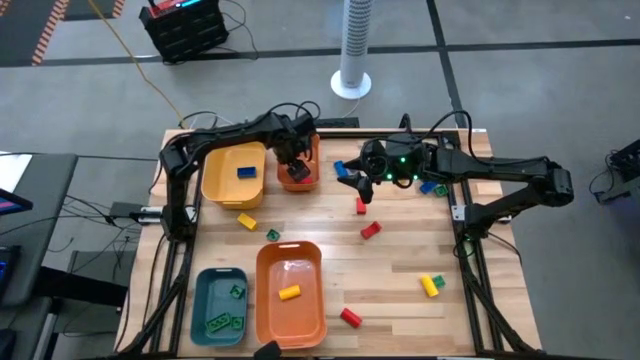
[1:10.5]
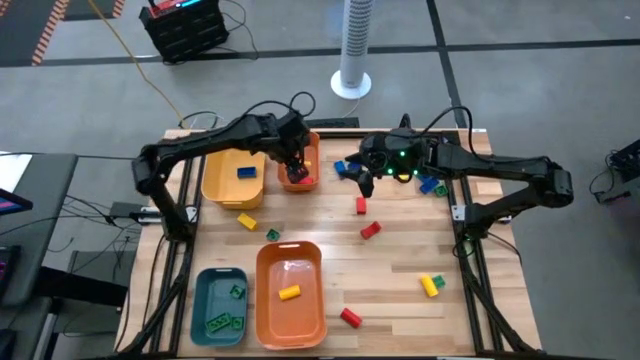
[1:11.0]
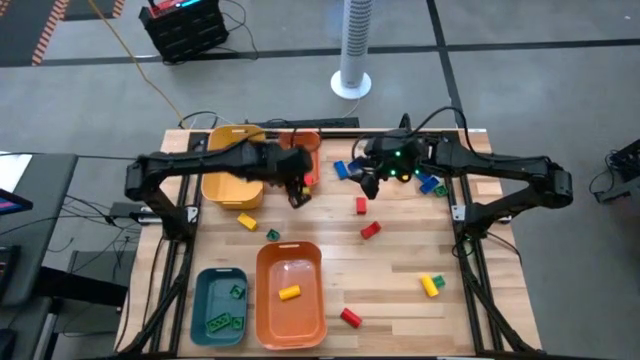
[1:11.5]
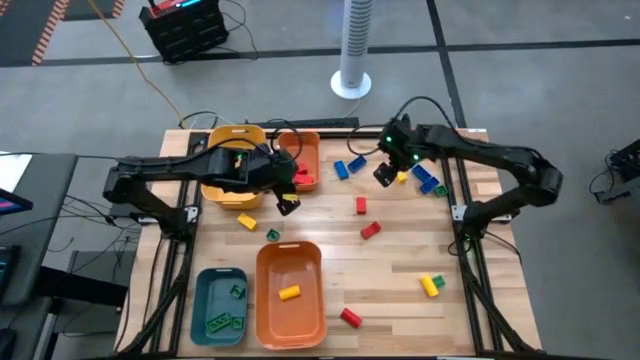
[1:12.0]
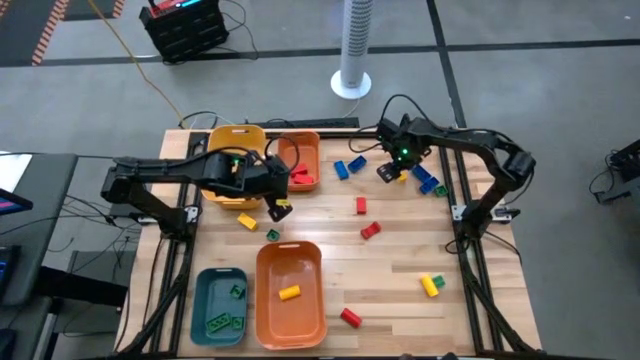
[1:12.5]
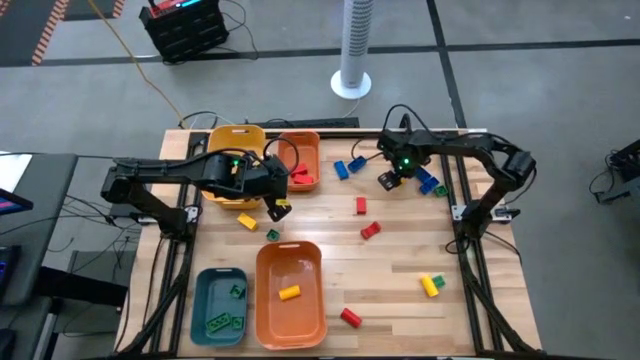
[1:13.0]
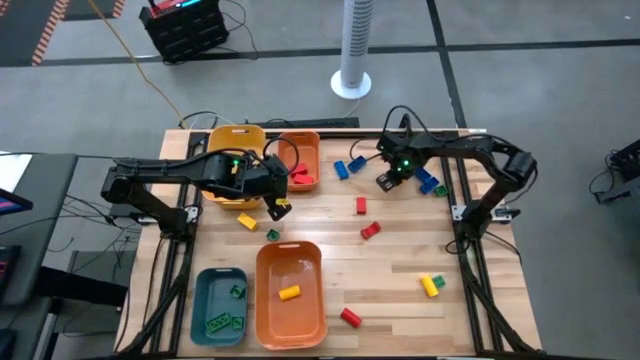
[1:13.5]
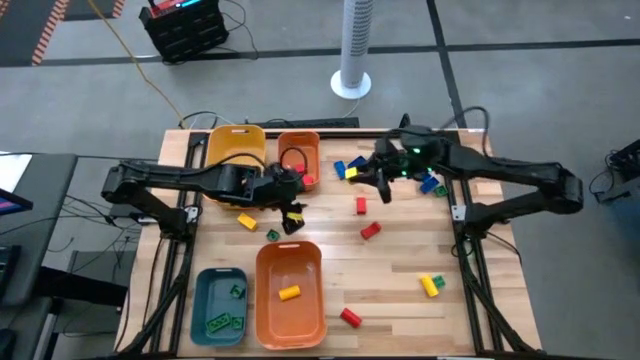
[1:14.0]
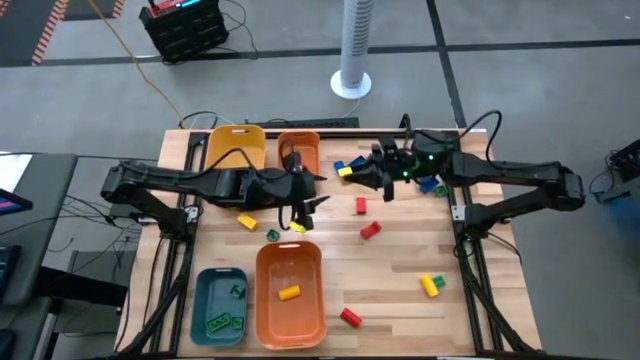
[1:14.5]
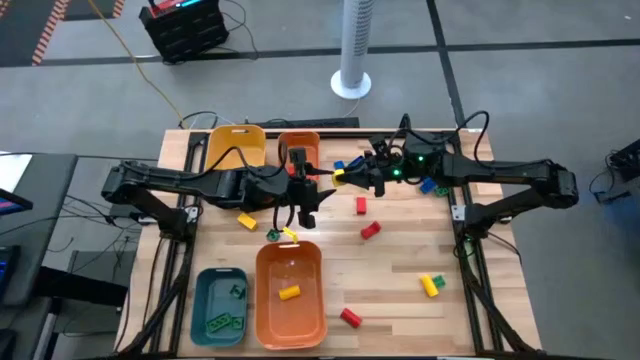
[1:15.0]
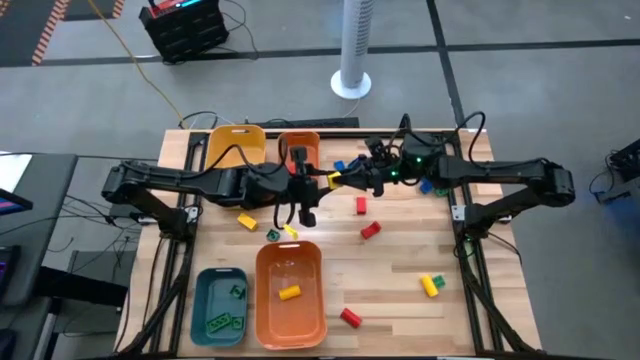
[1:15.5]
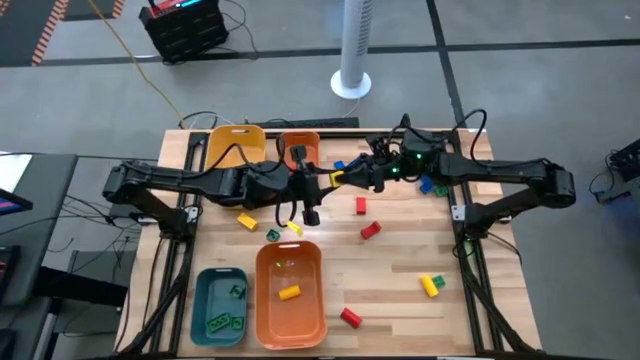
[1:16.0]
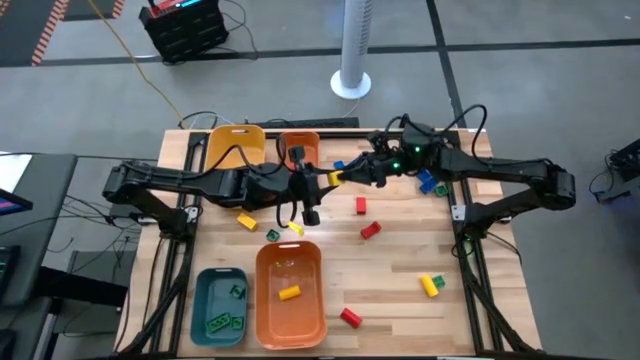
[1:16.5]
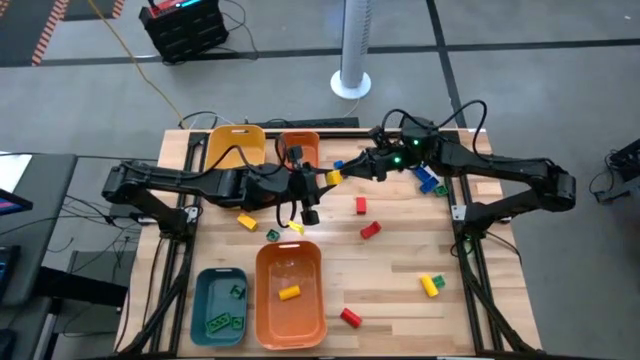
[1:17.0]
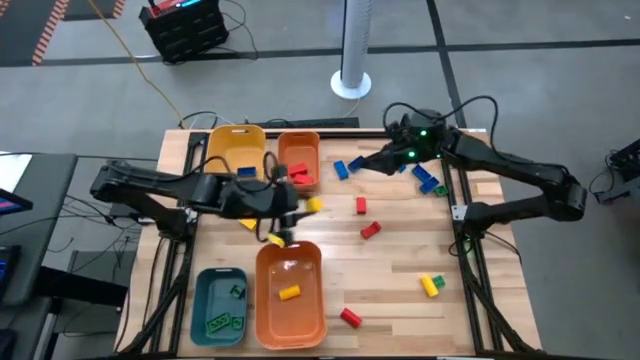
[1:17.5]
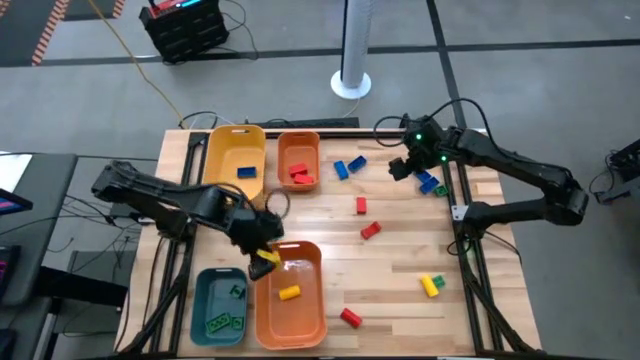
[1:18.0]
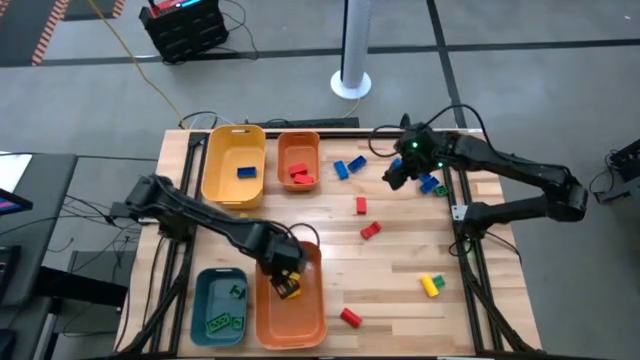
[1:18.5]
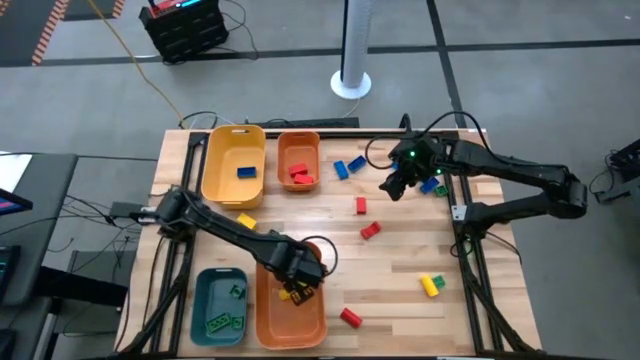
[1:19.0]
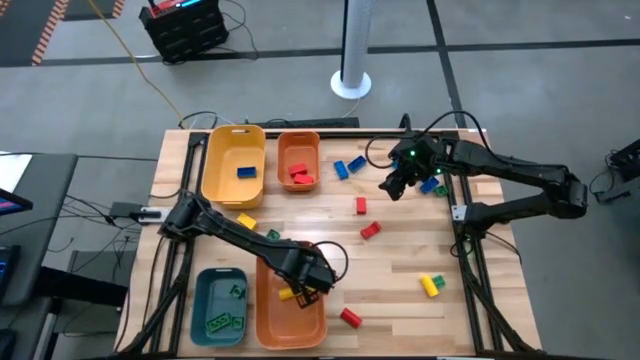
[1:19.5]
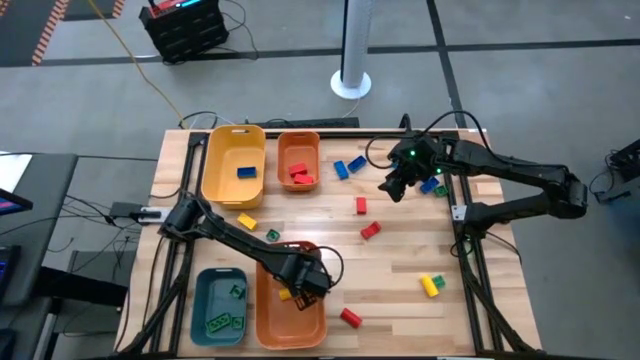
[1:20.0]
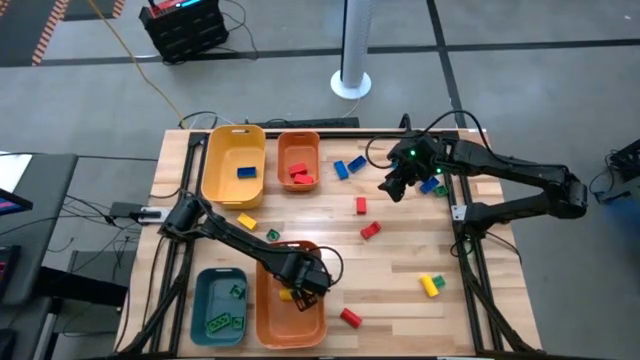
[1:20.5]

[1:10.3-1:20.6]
Task: Sort blocks
Put the yellow block into the bottom orange bin

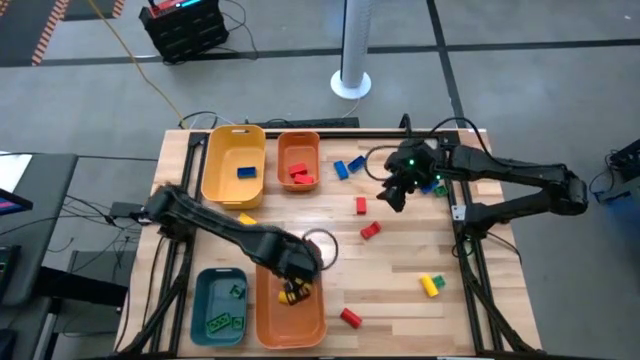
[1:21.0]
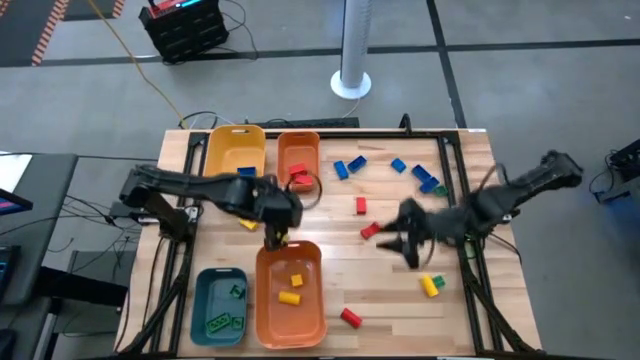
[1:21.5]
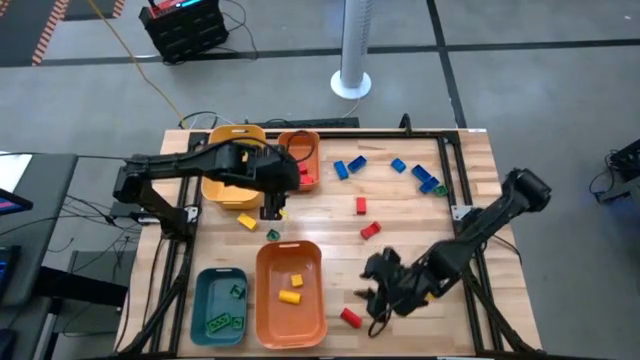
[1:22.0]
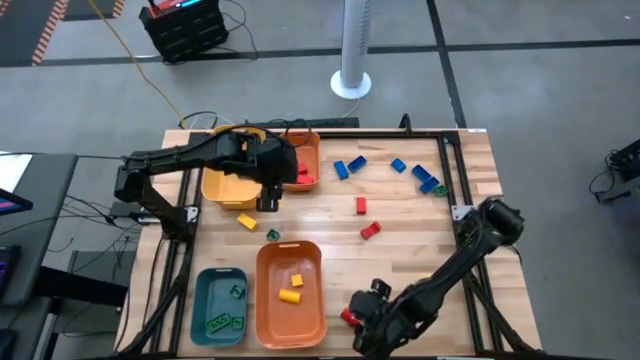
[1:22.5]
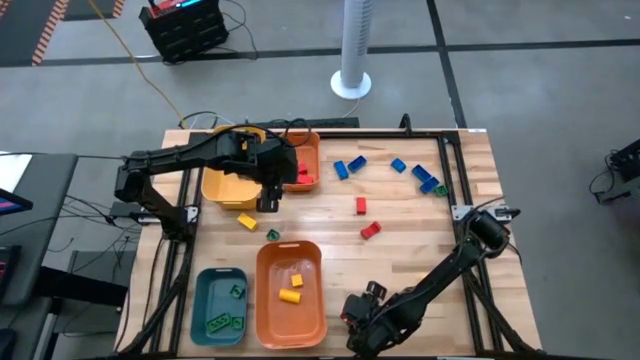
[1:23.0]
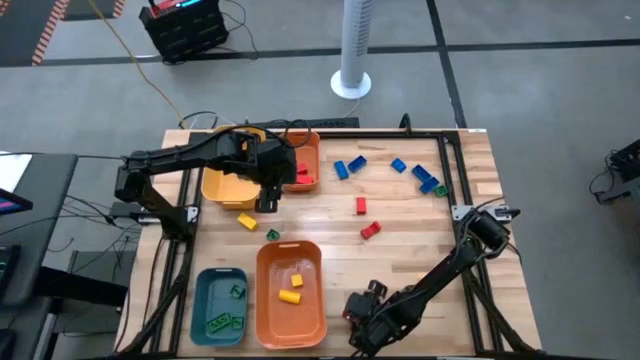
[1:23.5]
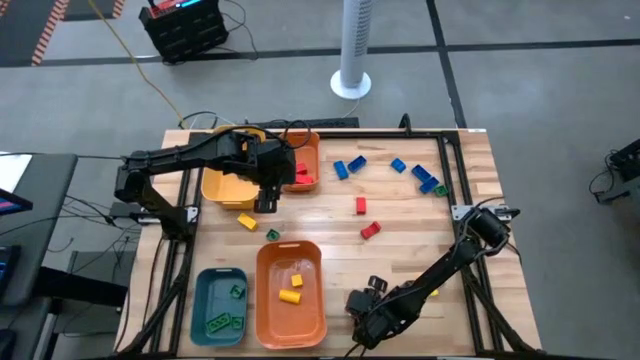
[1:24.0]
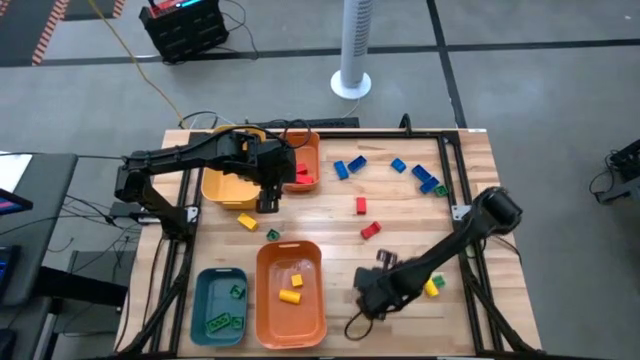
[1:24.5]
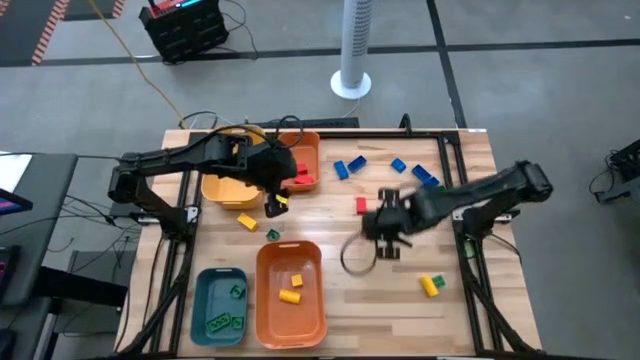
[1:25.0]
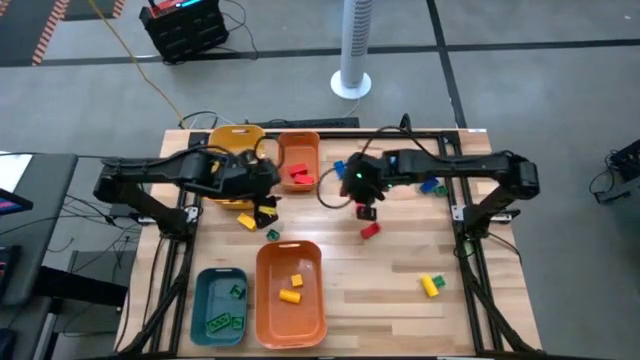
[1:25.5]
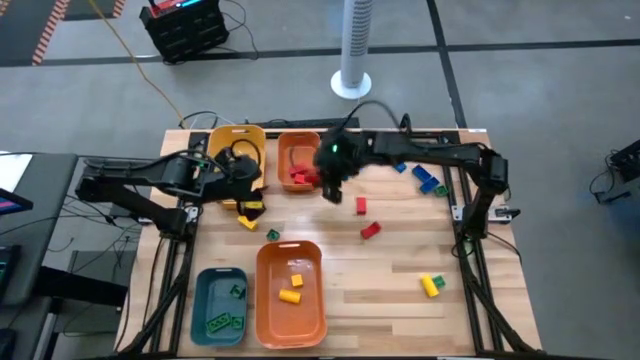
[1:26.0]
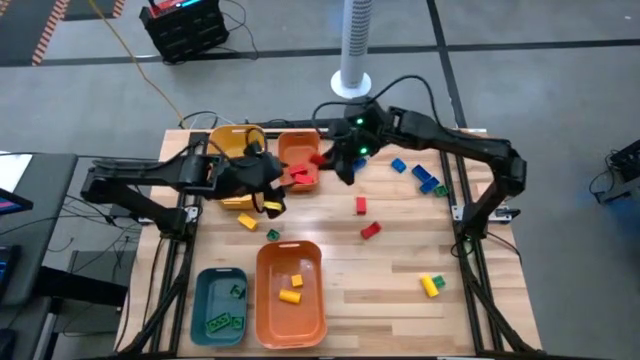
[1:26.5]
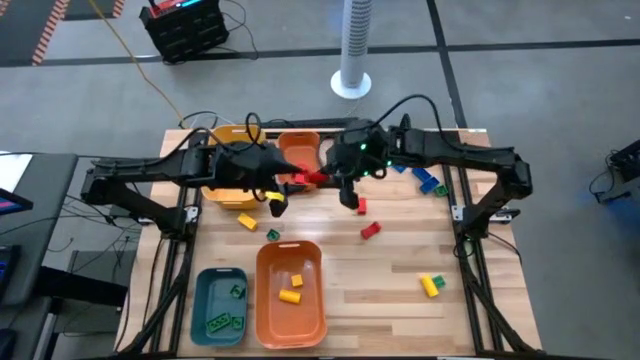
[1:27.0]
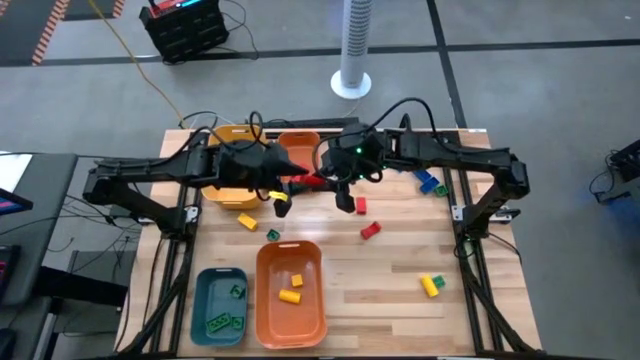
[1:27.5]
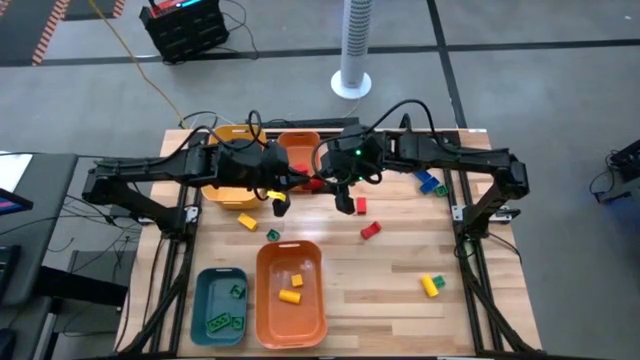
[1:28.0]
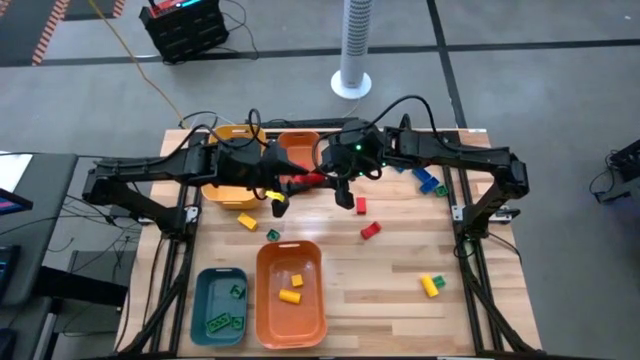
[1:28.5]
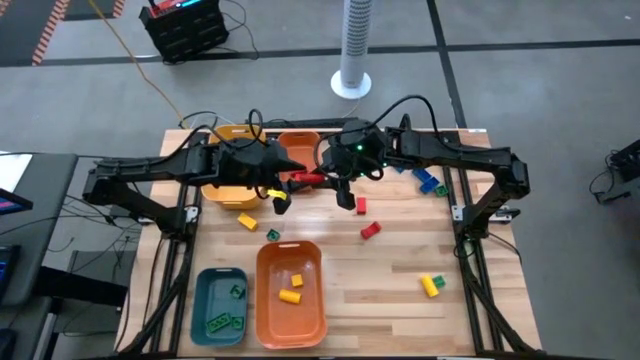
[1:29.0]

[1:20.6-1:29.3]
Put the red block into the top orange bin

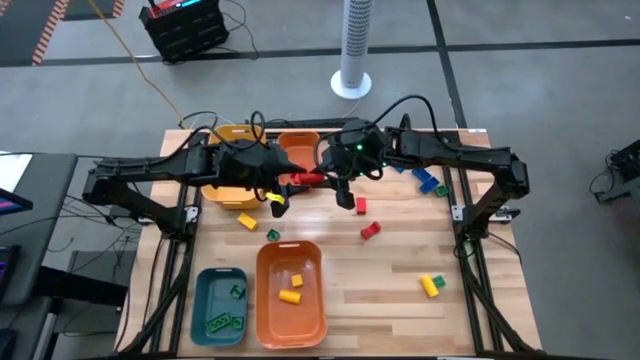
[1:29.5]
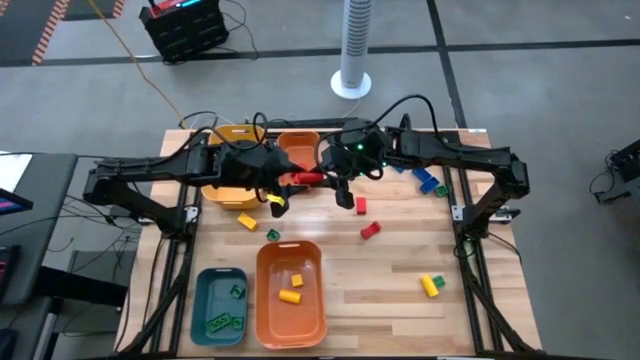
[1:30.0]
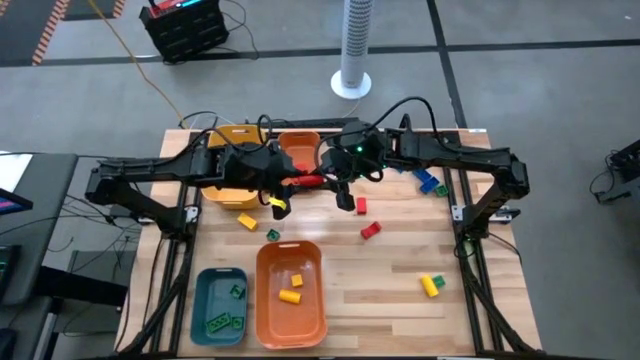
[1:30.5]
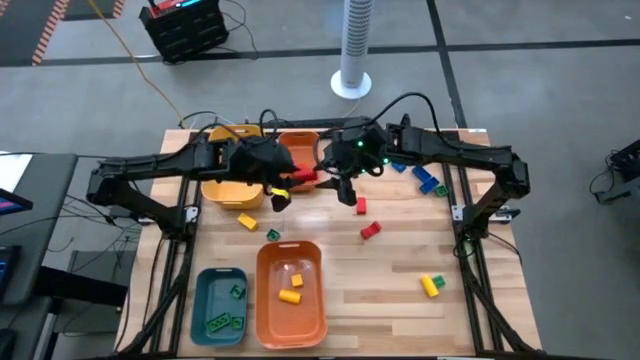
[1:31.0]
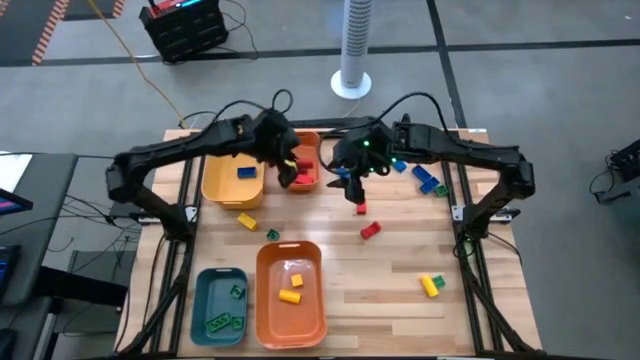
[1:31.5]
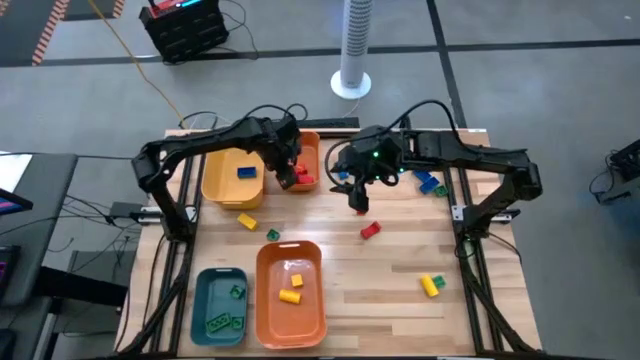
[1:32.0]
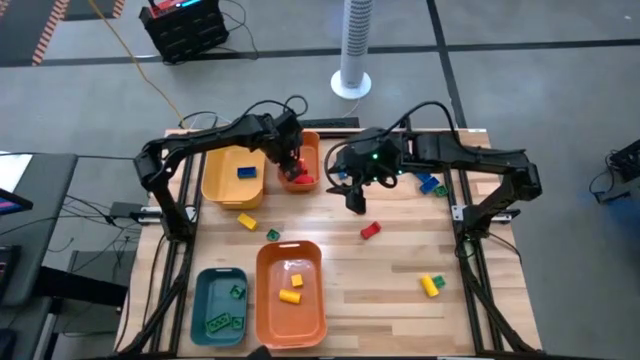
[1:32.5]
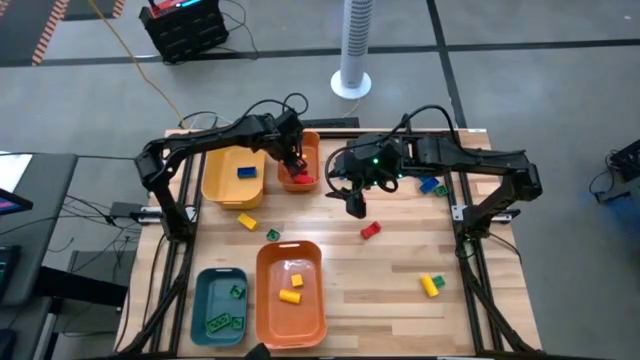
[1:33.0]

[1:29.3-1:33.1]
Put the red block into the top orange bin
